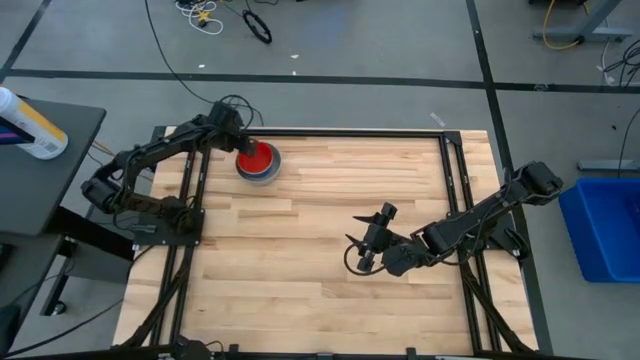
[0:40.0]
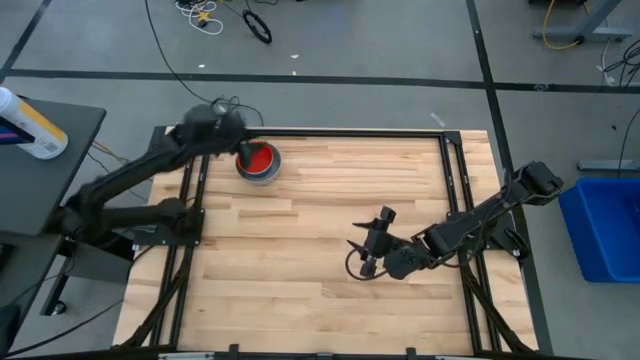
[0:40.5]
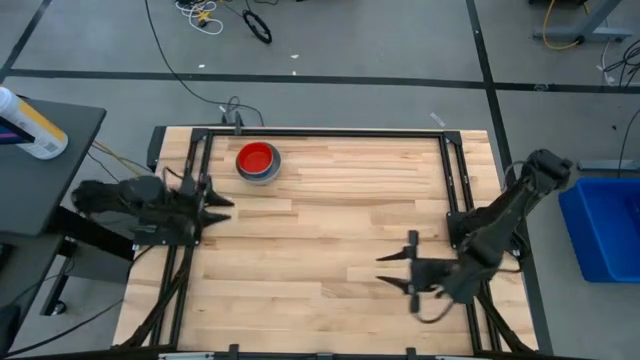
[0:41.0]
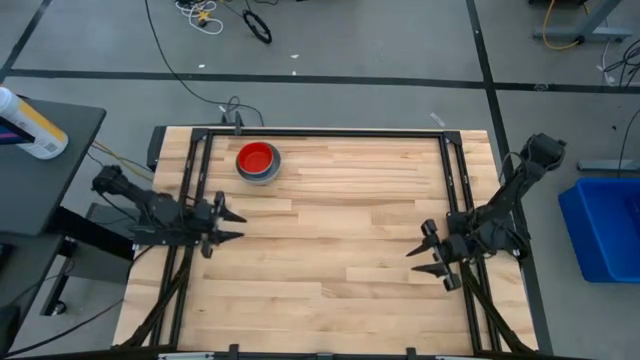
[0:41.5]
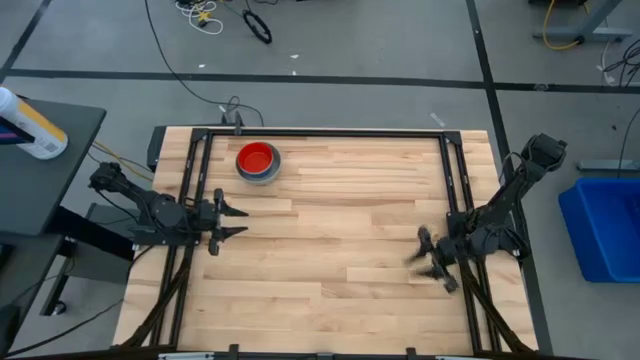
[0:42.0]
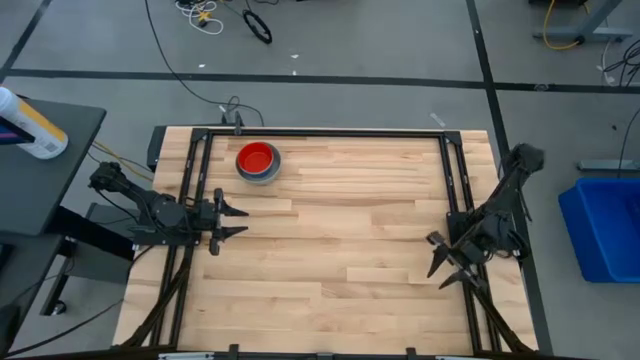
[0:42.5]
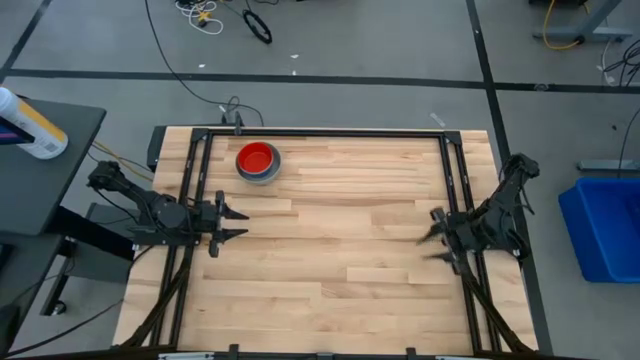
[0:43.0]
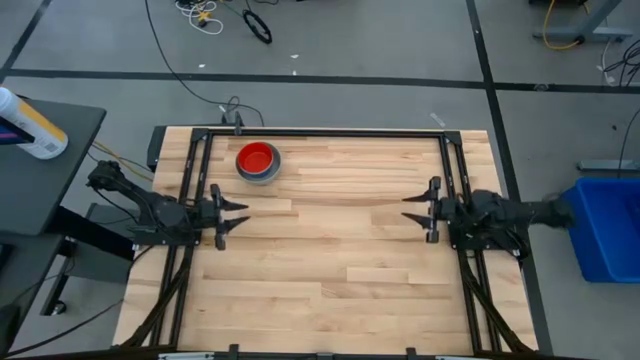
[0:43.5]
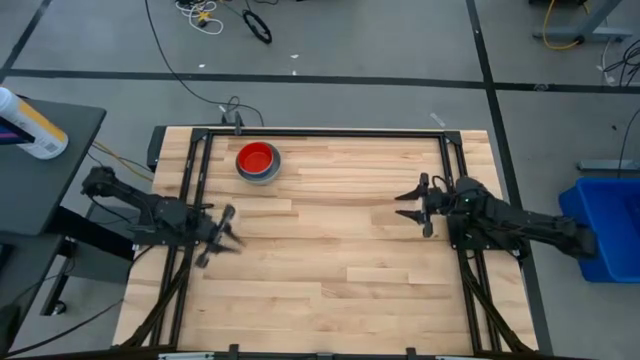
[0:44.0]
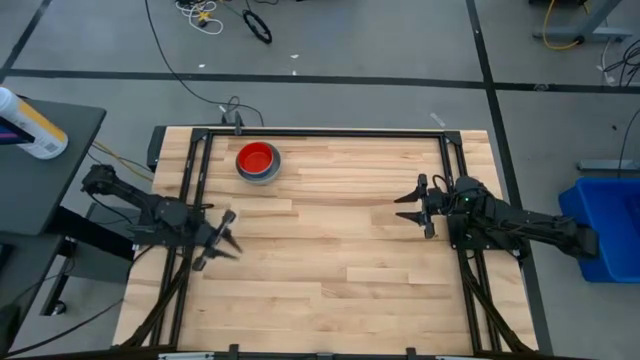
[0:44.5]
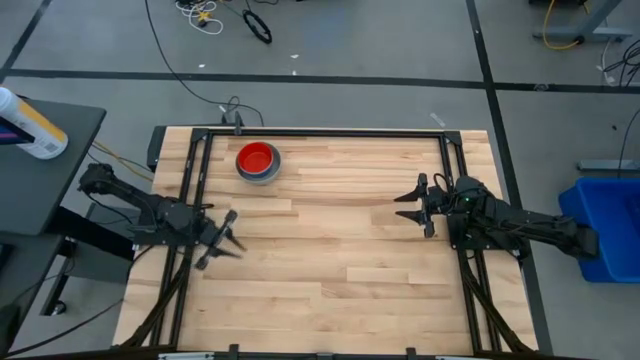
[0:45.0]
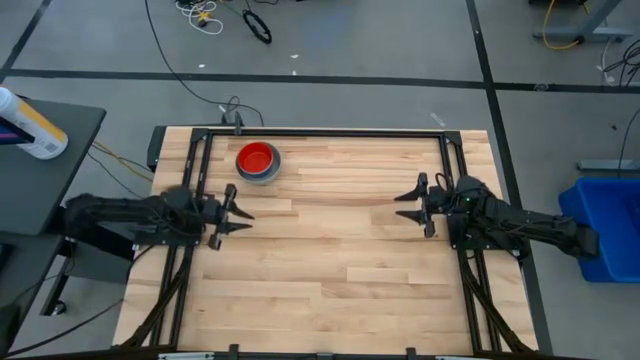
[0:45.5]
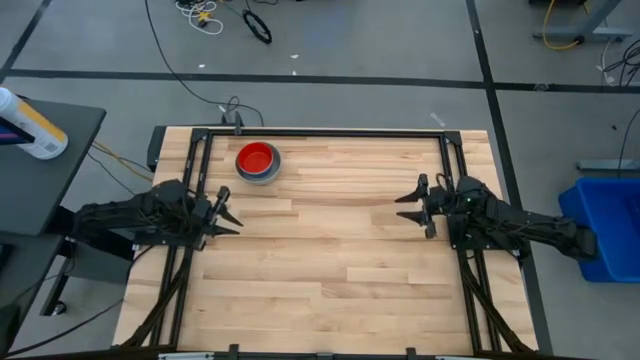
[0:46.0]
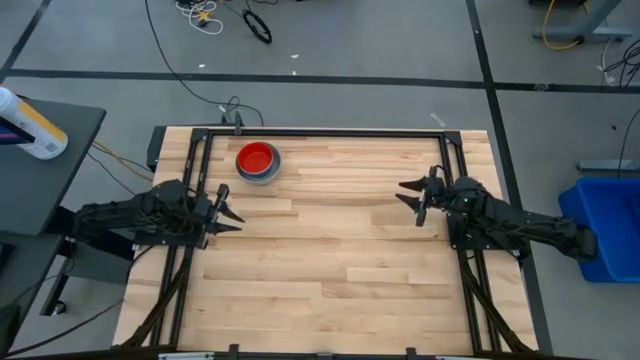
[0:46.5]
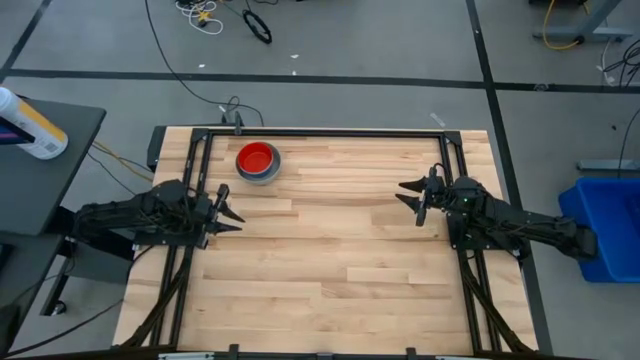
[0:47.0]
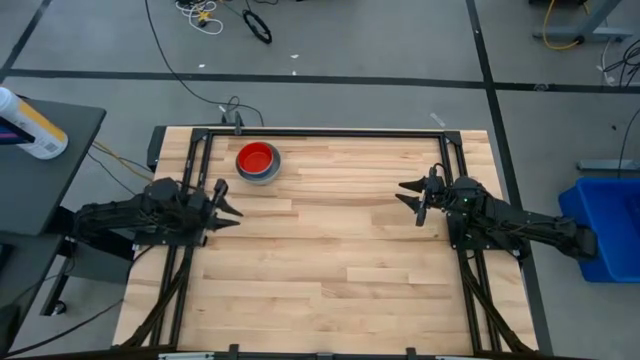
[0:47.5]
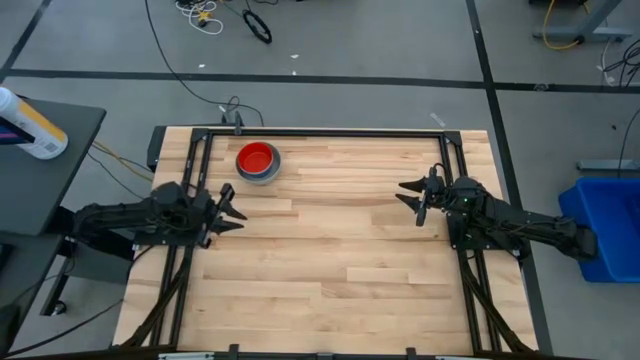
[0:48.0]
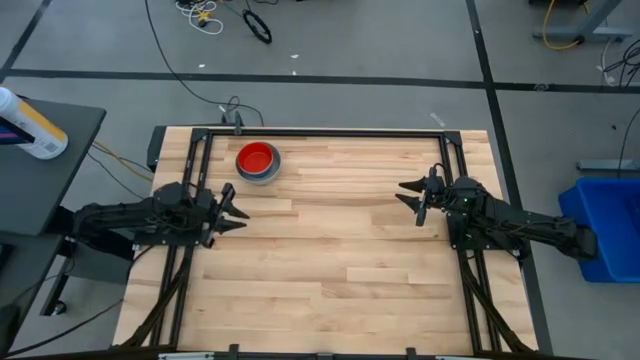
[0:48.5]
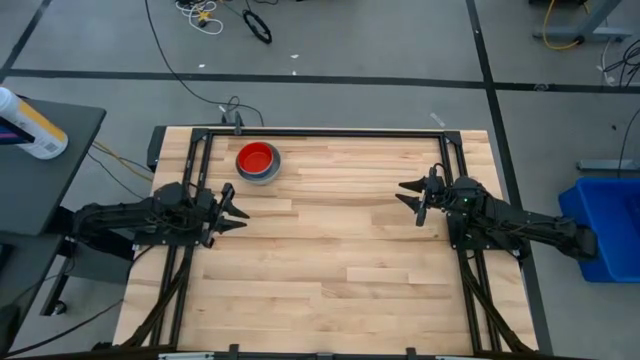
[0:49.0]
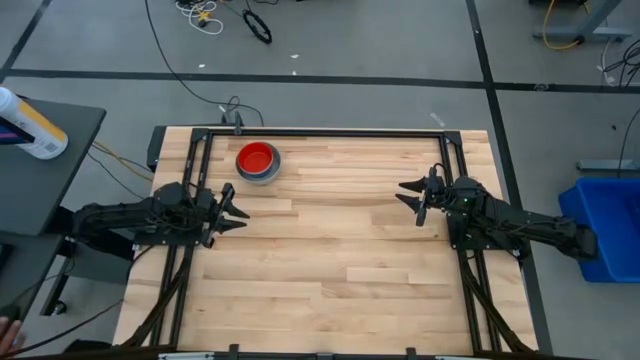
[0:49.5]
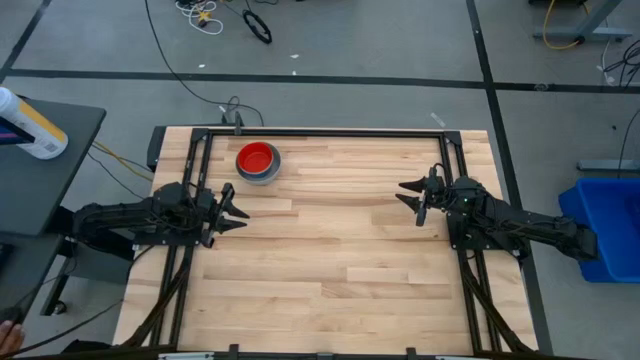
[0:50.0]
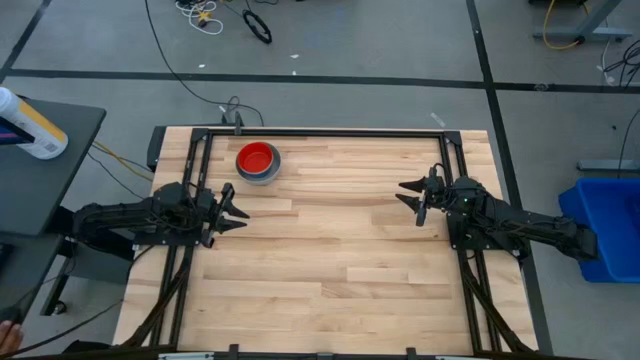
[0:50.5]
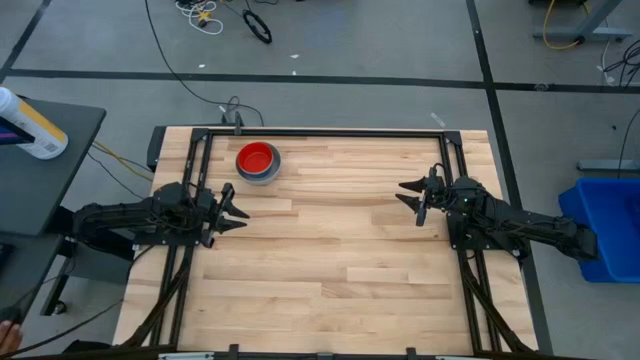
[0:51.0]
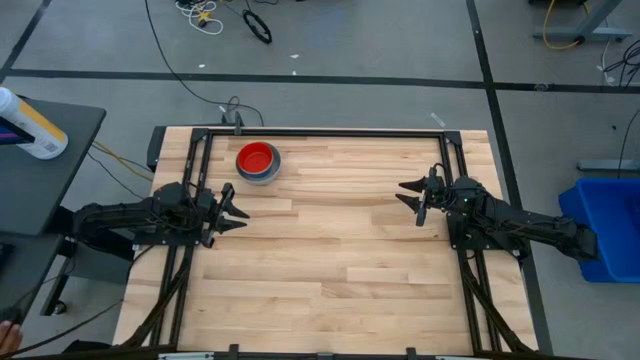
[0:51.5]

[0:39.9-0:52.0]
Return to Home Position

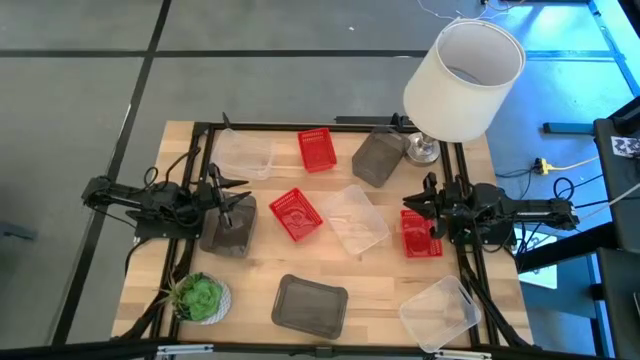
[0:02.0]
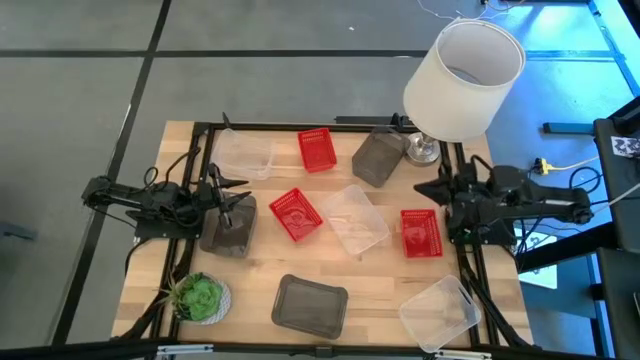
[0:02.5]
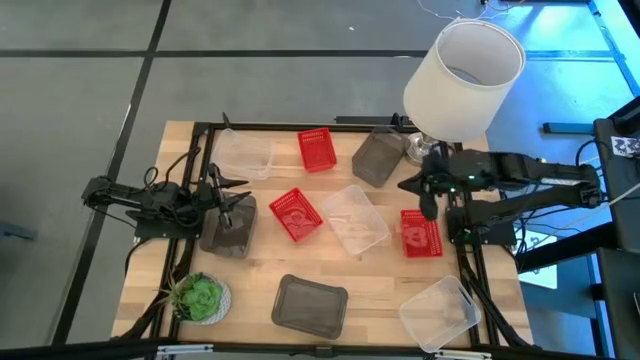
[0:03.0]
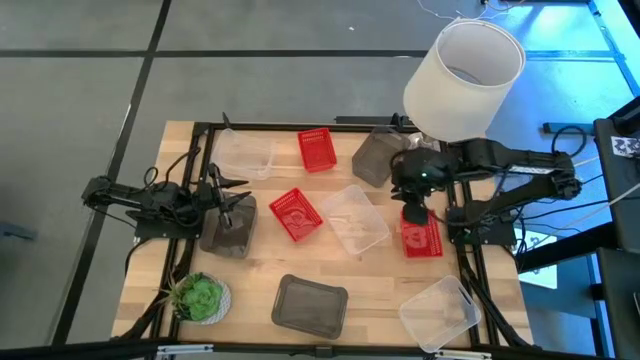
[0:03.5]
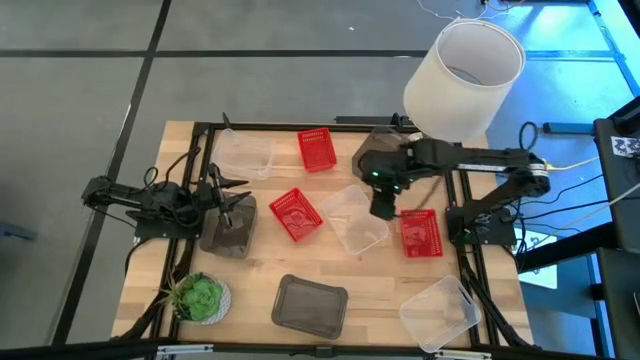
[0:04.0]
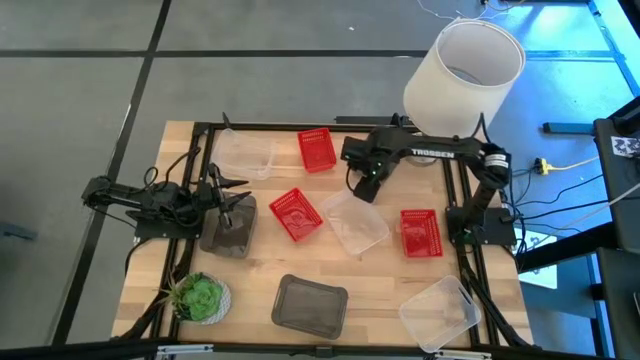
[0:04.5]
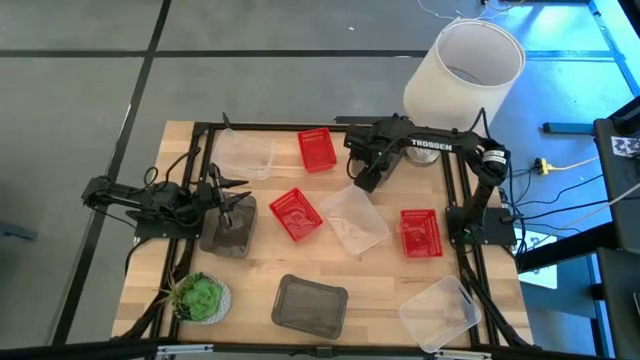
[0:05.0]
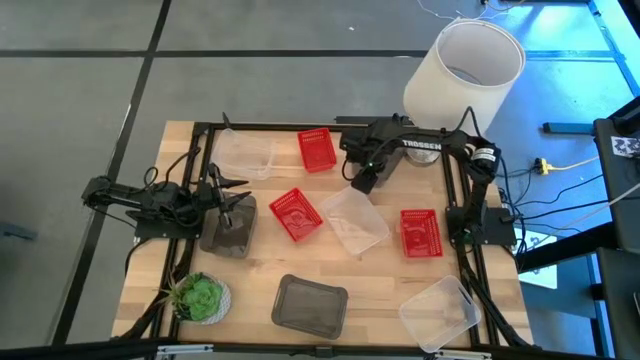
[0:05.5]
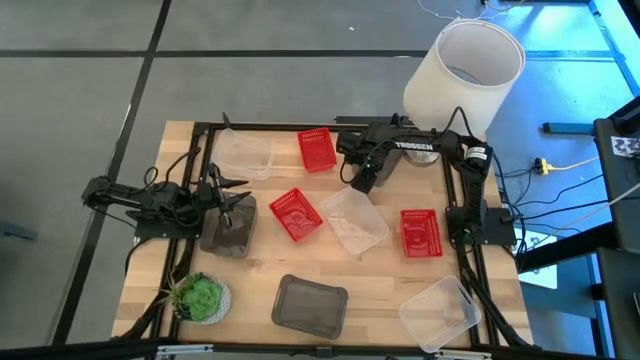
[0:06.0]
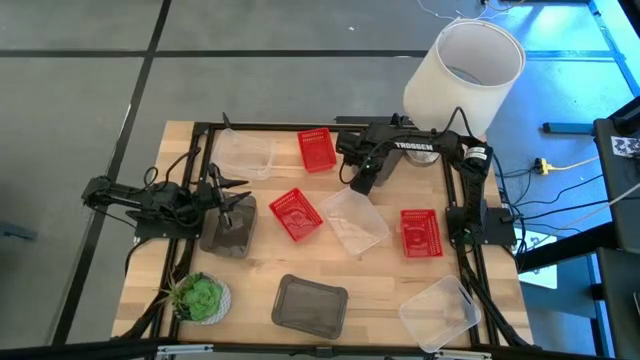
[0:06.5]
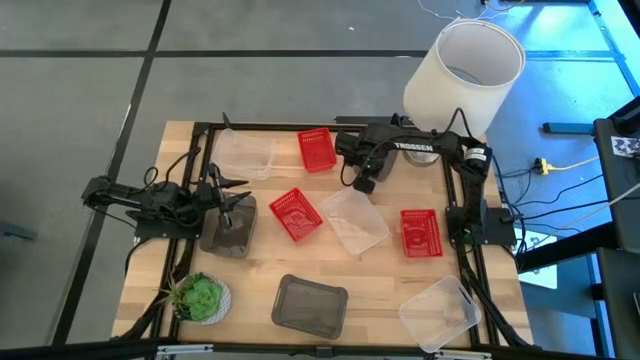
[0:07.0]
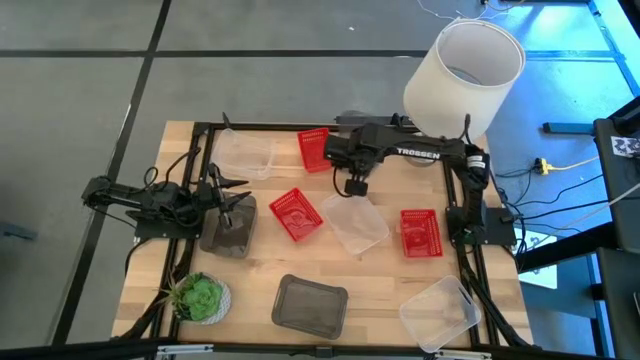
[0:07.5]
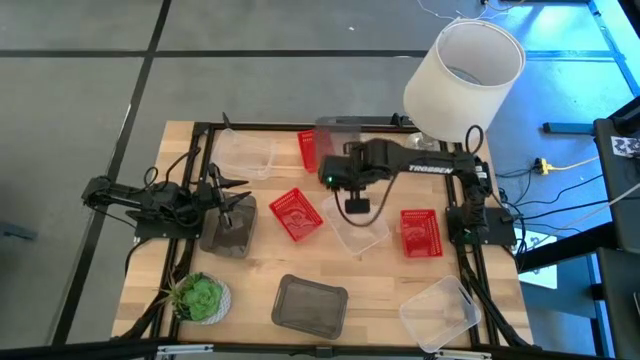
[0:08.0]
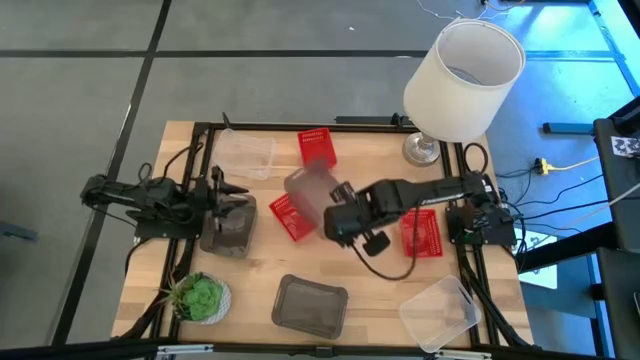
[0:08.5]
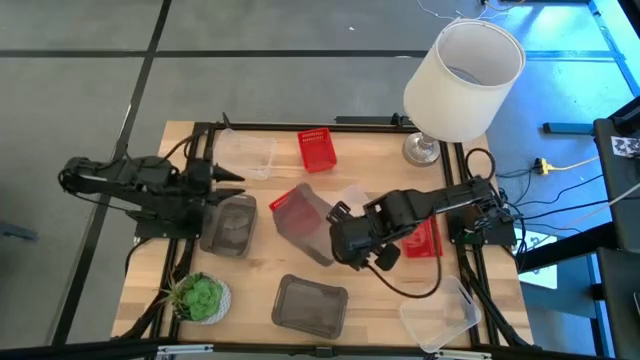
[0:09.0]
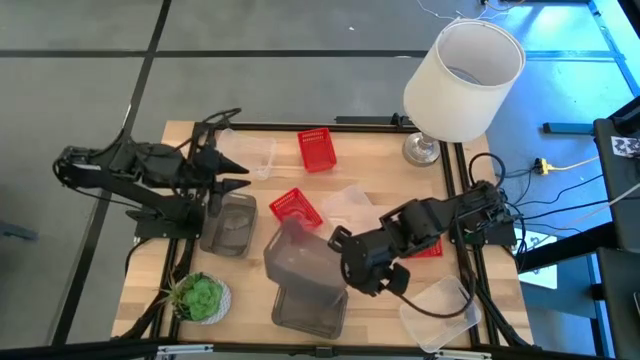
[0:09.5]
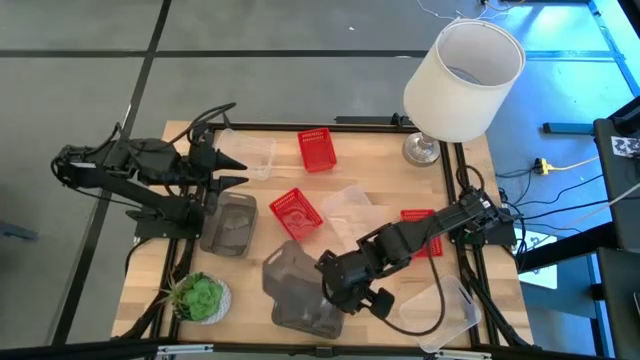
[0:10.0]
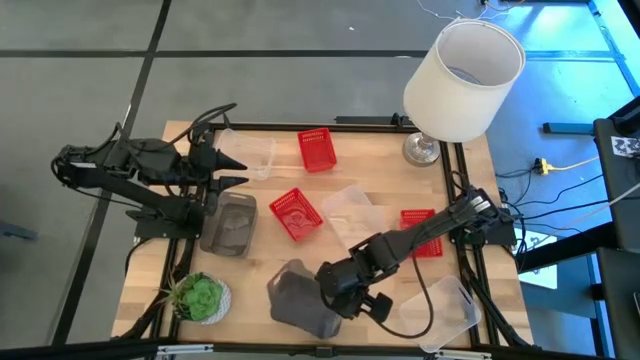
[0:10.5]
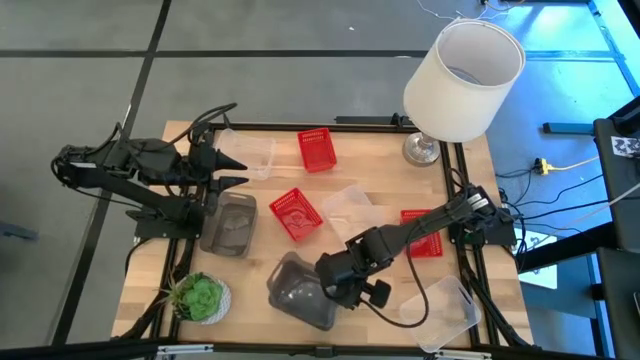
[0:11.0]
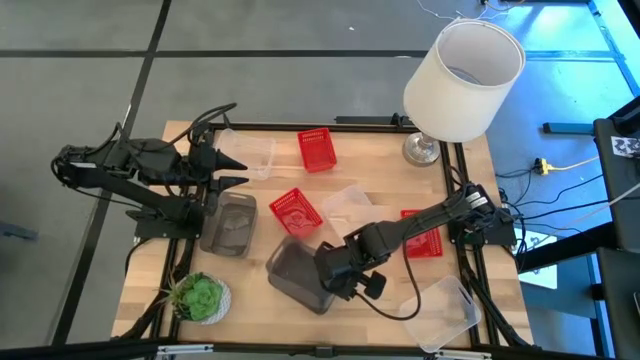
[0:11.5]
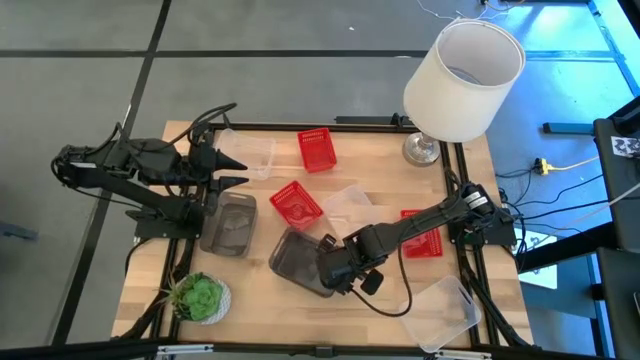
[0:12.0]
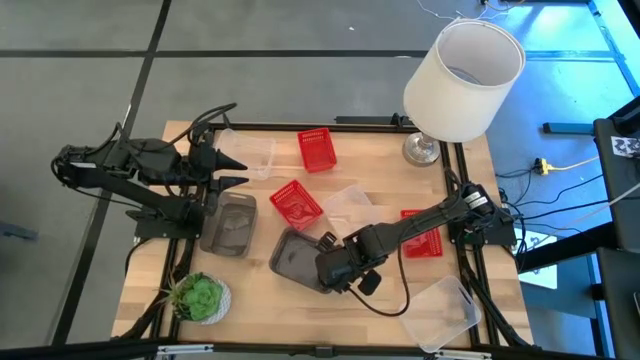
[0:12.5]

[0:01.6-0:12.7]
Stack the top black bin on the bottom black bin
